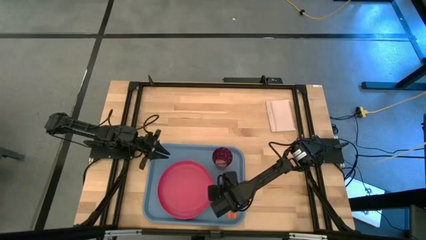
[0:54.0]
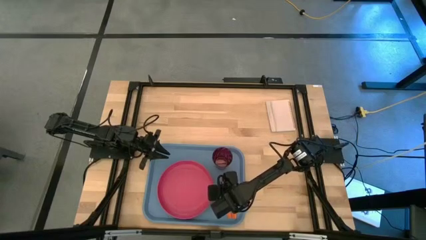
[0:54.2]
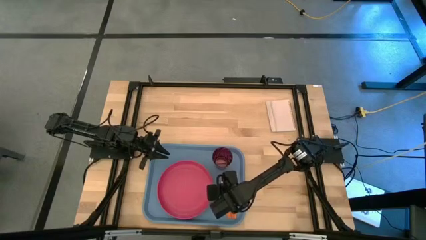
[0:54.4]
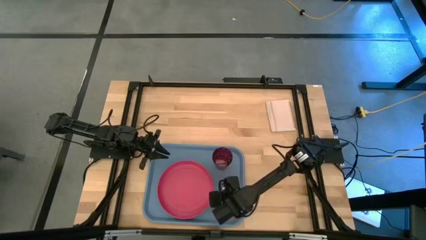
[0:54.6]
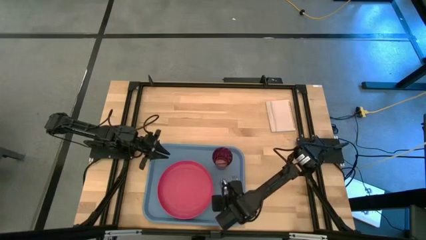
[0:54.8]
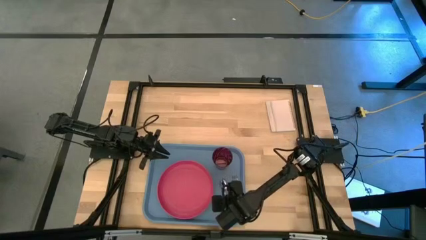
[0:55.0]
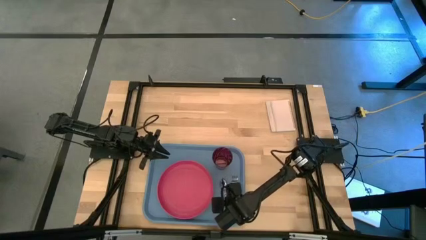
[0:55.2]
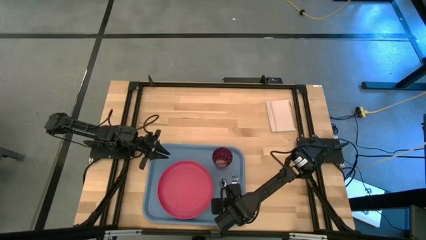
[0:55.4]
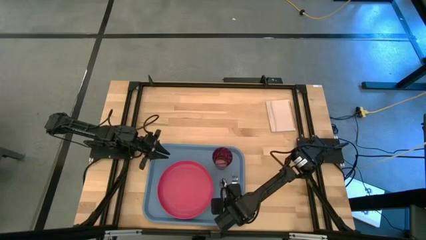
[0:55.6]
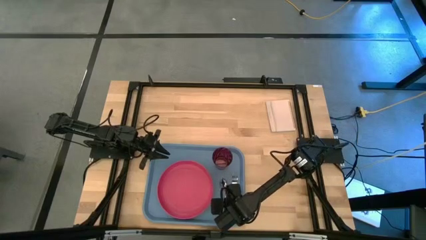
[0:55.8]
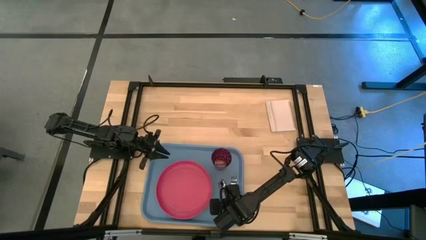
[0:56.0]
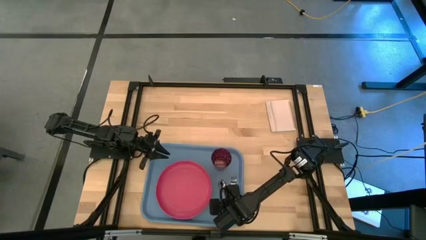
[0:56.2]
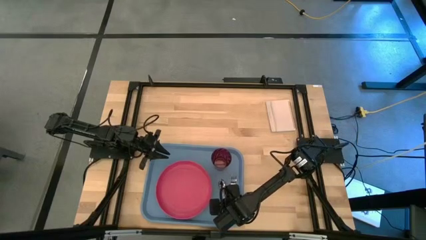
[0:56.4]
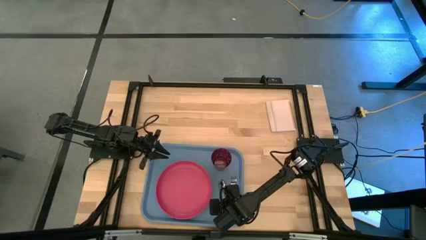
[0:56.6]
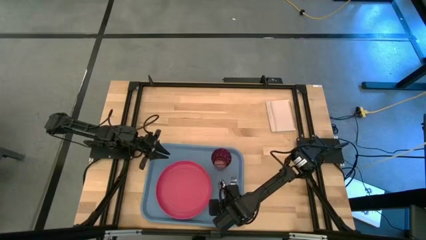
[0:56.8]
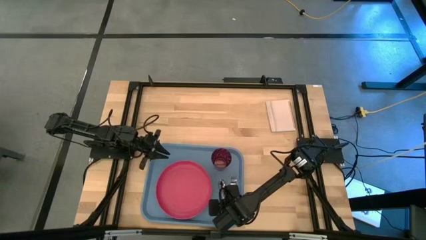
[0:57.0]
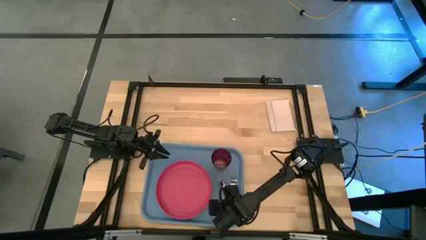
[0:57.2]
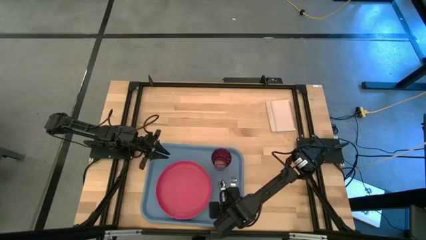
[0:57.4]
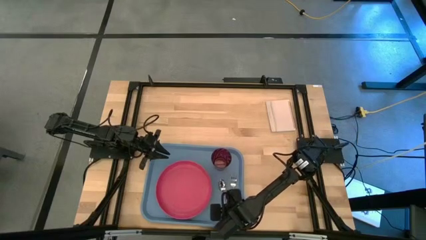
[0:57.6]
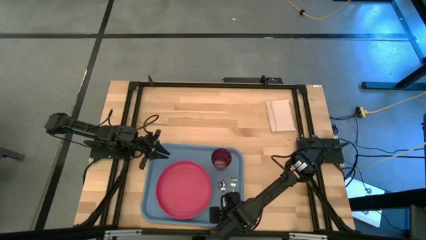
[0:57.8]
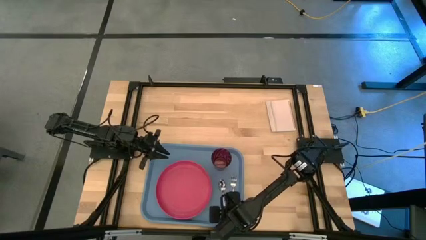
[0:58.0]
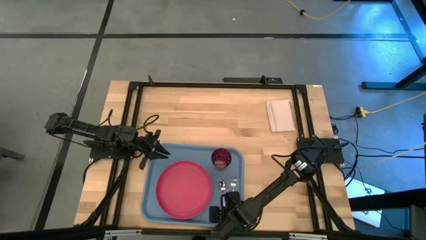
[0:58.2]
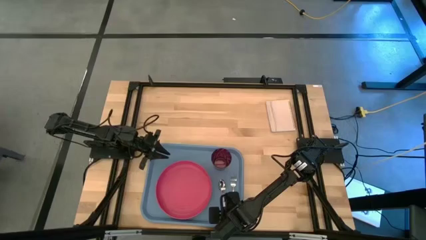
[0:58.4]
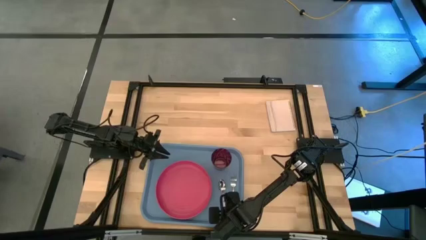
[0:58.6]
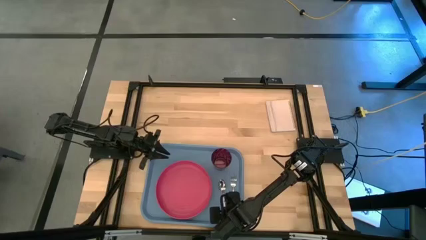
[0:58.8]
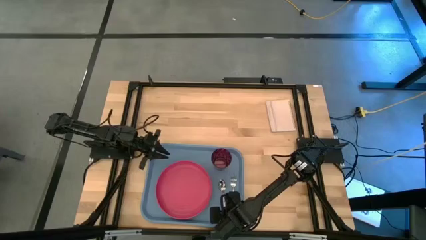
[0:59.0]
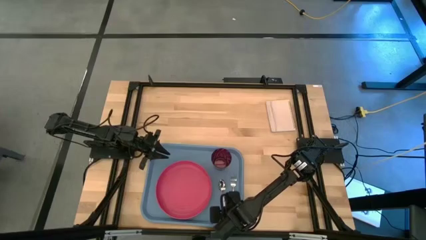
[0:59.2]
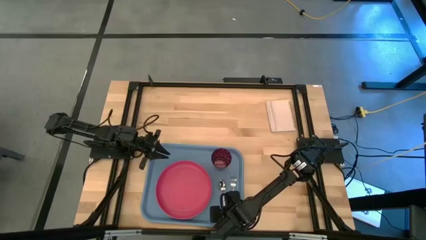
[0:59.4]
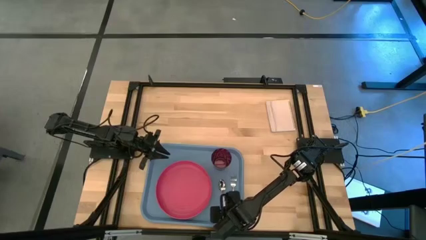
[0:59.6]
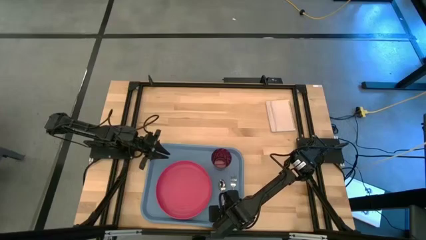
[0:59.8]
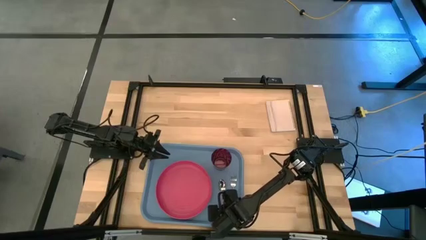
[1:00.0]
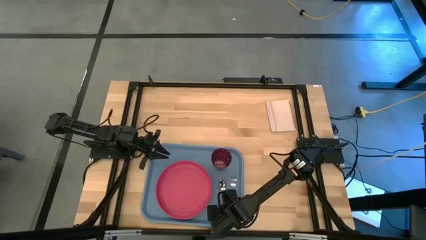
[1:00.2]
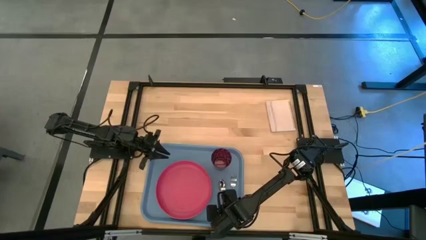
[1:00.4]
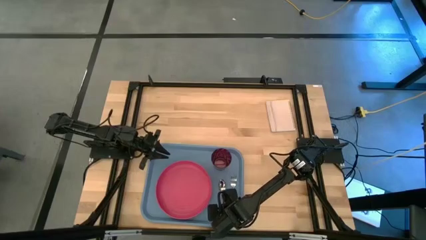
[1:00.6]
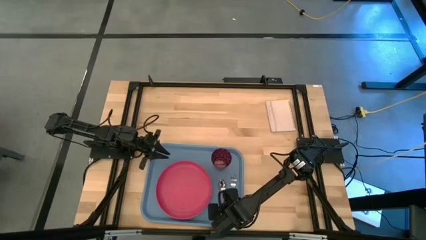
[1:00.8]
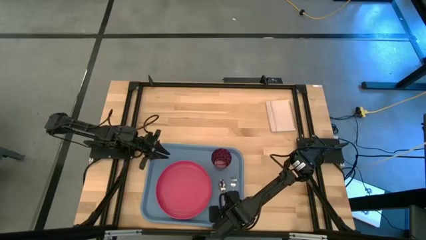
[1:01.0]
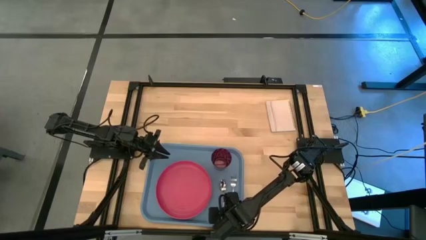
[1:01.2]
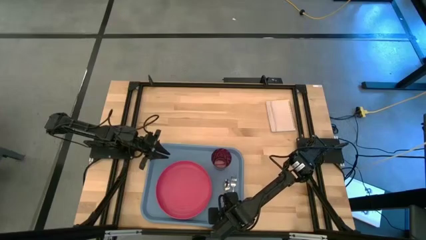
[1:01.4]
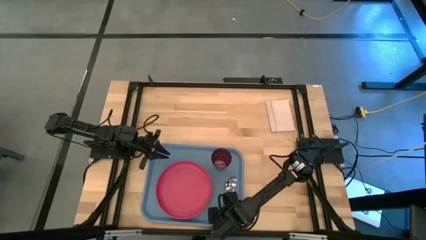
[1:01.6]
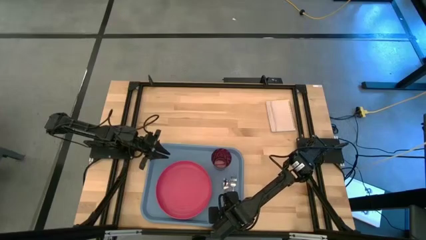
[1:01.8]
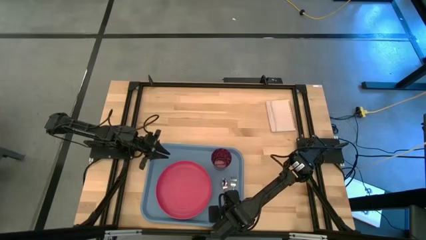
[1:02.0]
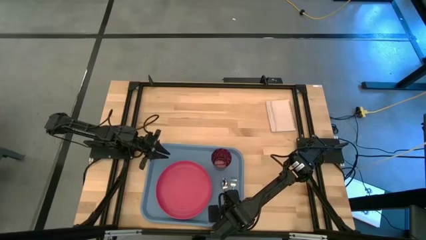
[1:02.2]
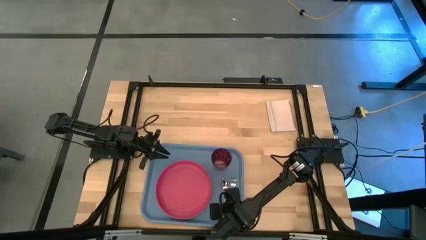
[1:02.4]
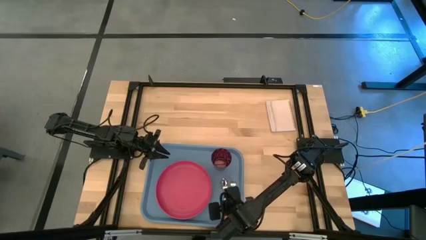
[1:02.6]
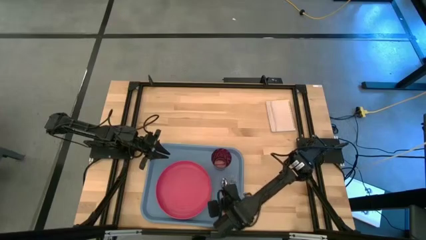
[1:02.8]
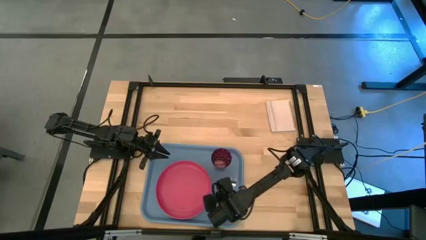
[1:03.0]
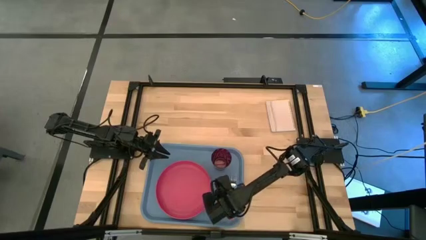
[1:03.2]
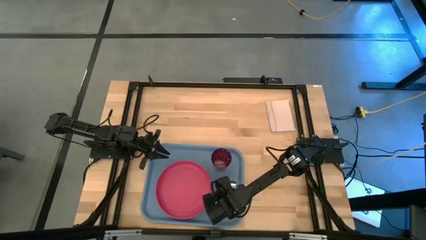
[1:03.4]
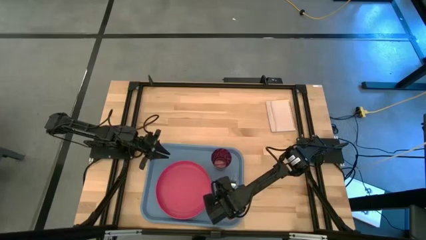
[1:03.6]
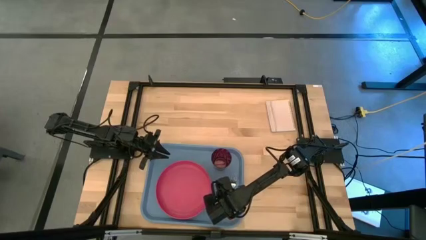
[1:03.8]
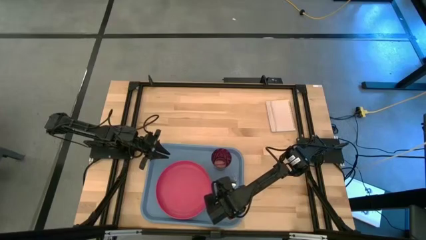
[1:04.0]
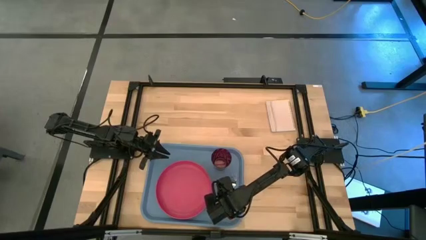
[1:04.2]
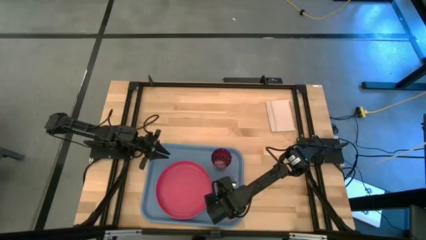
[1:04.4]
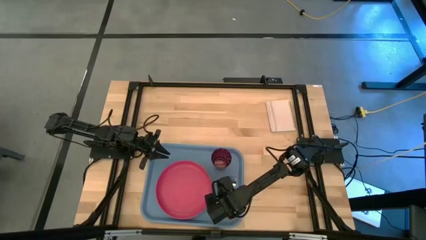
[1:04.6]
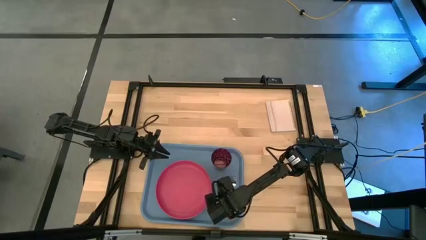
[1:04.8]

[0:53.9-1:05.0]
Task: Pick and place plate/cup/fork/spoon on tray
Put the orange spoon on the blue serving tray to the left of the orange fork
